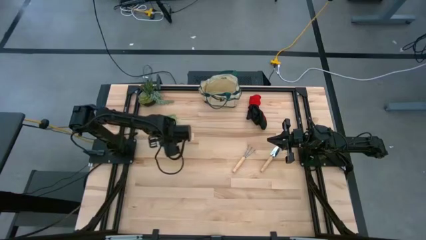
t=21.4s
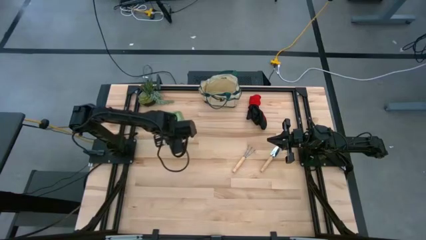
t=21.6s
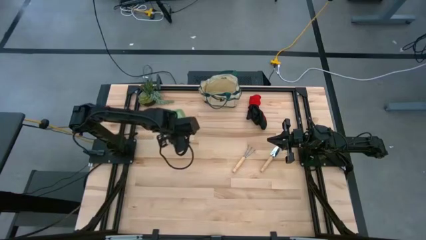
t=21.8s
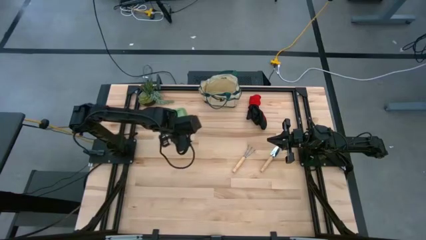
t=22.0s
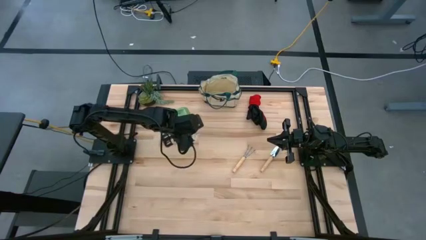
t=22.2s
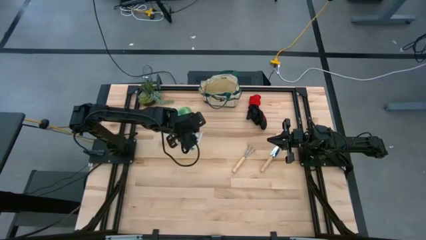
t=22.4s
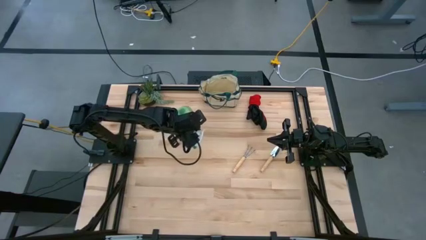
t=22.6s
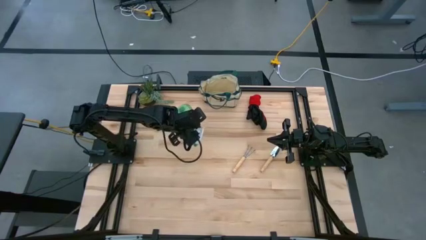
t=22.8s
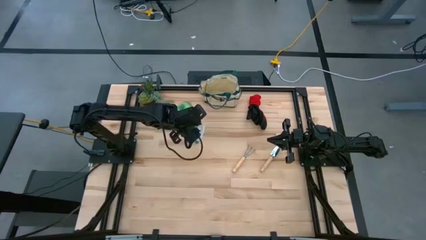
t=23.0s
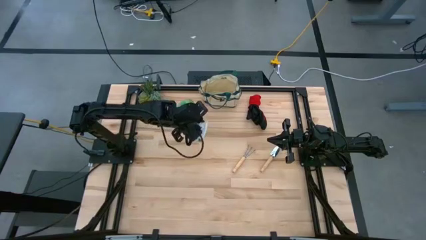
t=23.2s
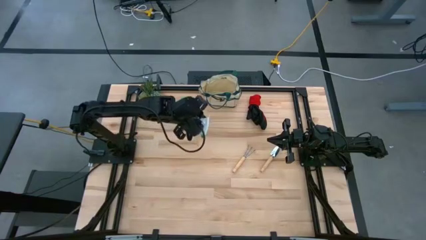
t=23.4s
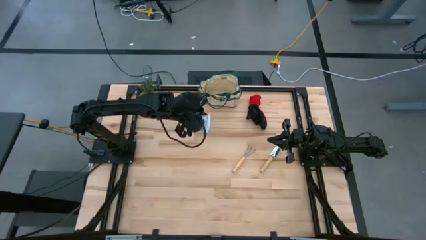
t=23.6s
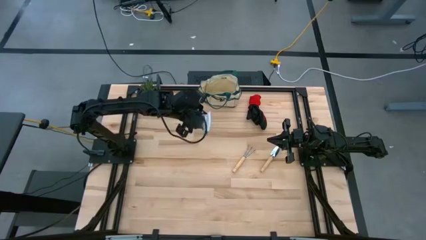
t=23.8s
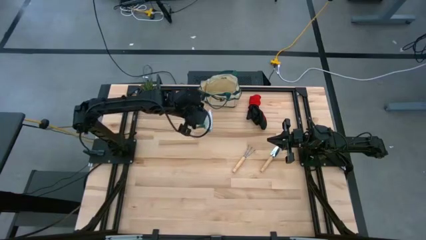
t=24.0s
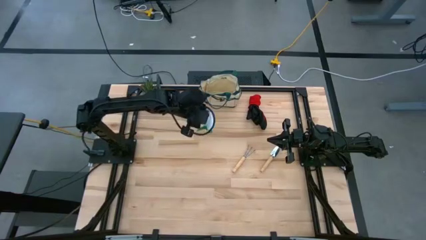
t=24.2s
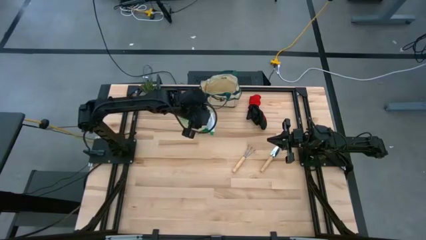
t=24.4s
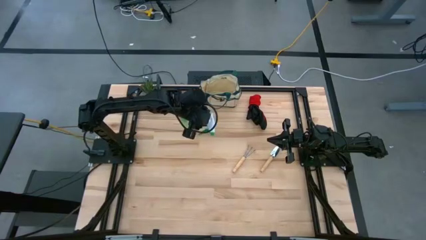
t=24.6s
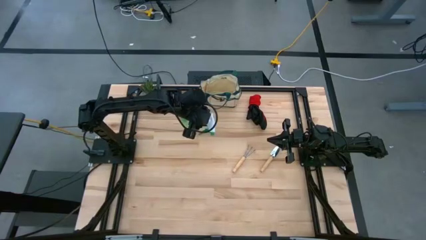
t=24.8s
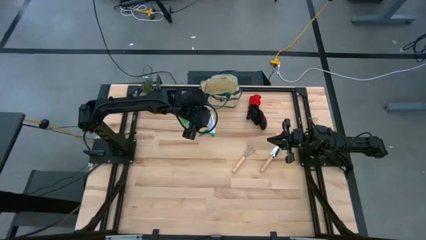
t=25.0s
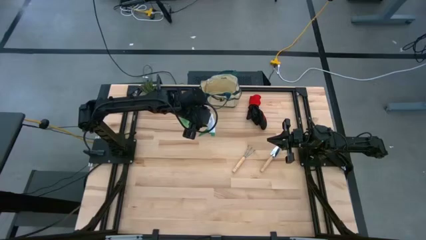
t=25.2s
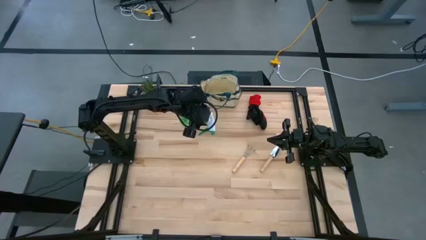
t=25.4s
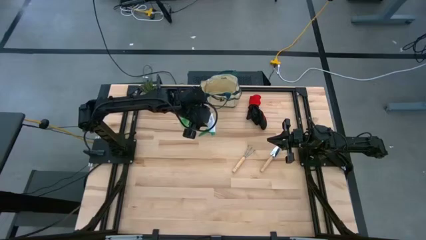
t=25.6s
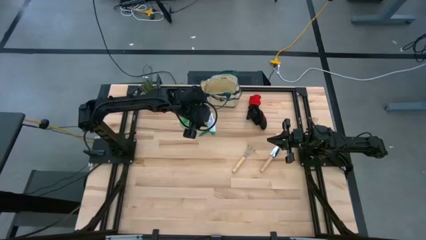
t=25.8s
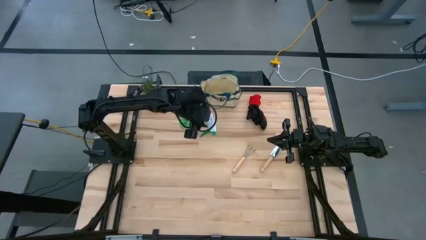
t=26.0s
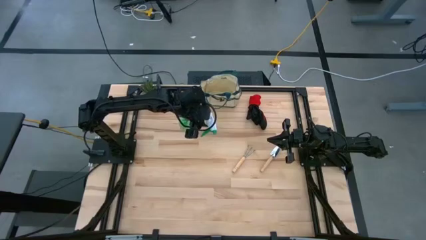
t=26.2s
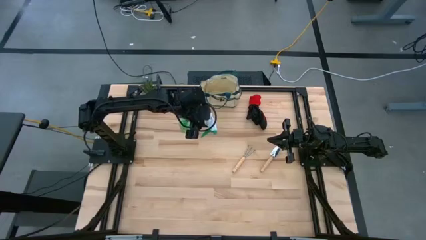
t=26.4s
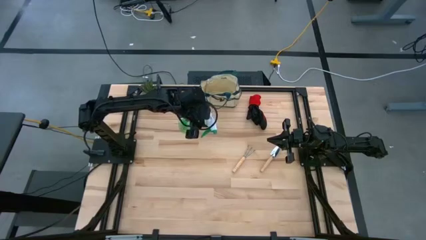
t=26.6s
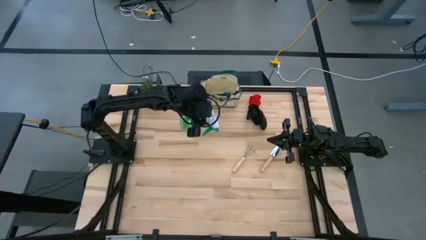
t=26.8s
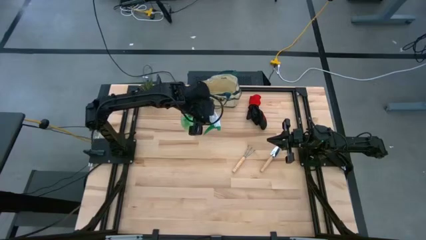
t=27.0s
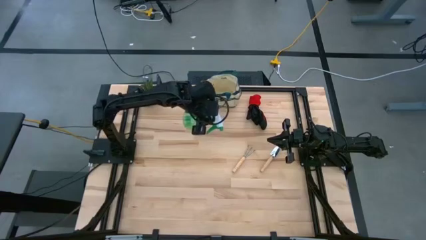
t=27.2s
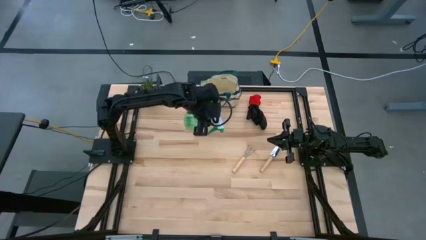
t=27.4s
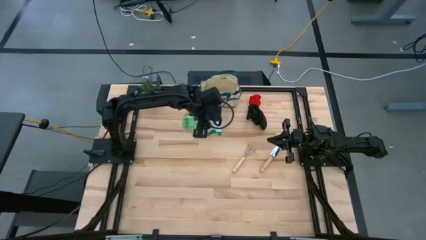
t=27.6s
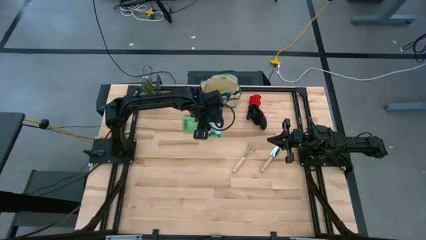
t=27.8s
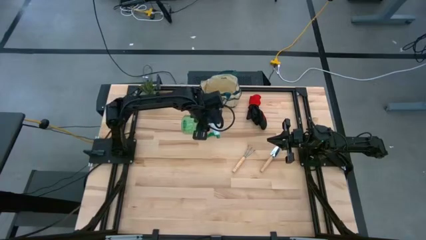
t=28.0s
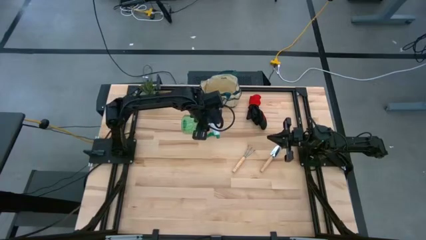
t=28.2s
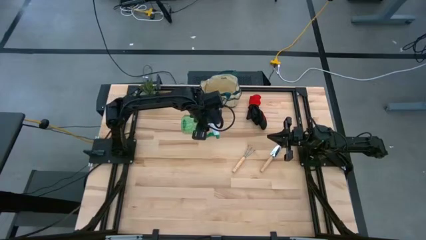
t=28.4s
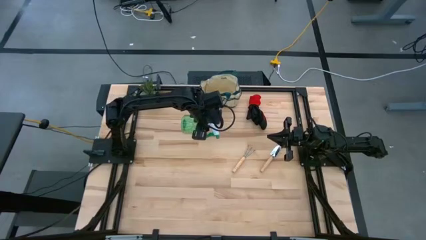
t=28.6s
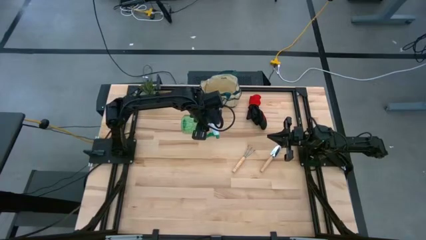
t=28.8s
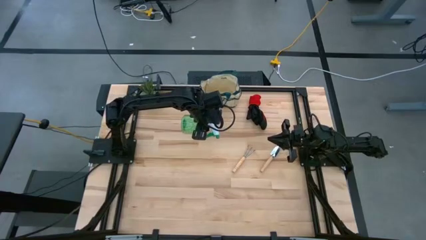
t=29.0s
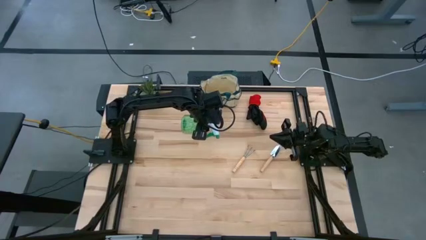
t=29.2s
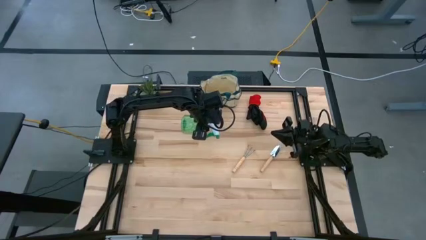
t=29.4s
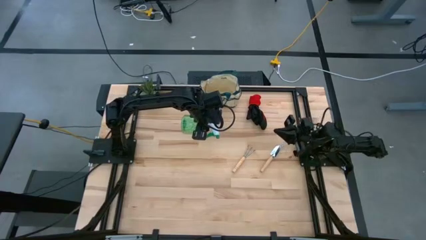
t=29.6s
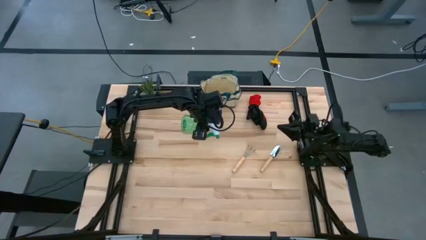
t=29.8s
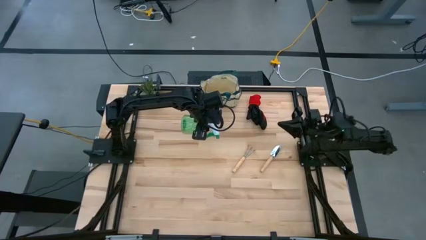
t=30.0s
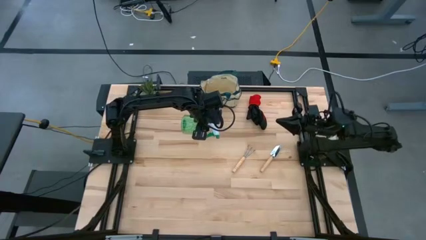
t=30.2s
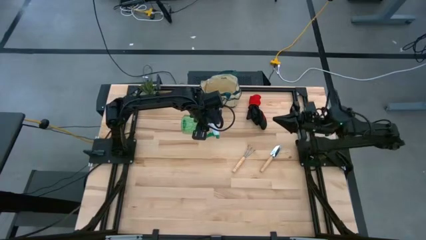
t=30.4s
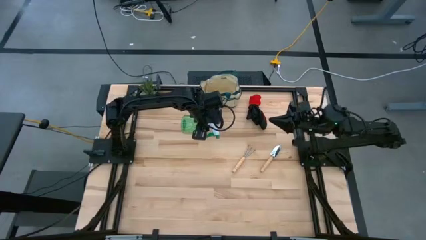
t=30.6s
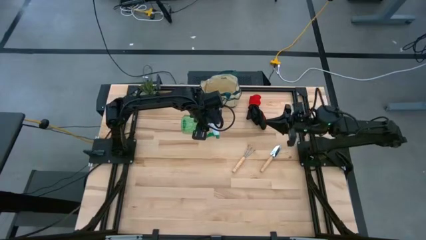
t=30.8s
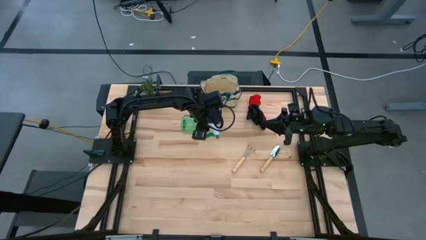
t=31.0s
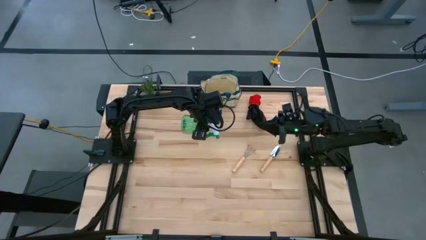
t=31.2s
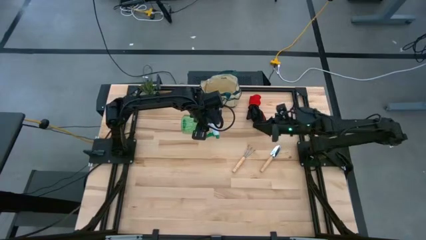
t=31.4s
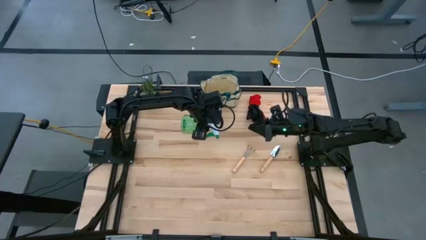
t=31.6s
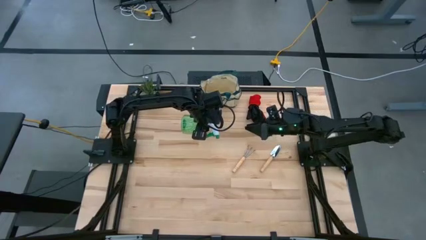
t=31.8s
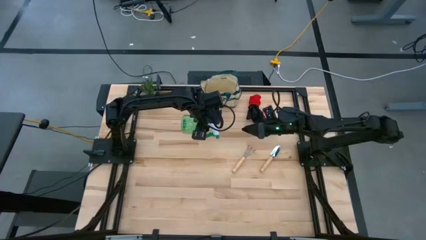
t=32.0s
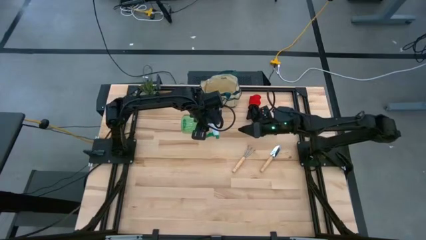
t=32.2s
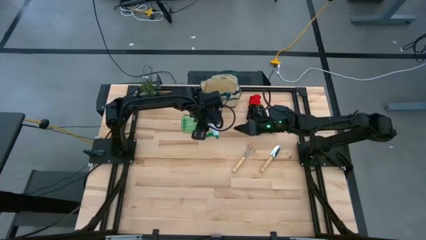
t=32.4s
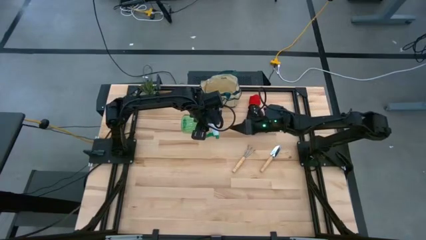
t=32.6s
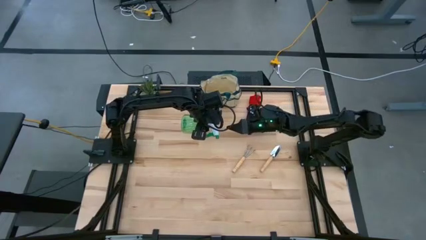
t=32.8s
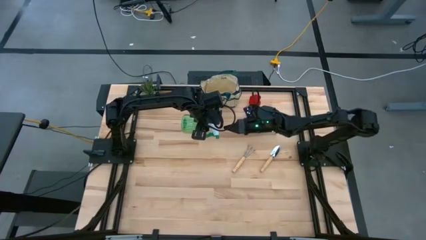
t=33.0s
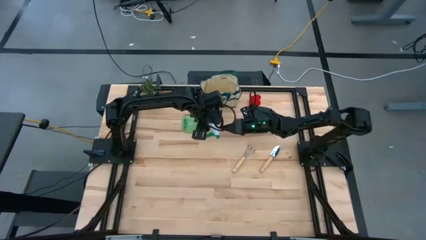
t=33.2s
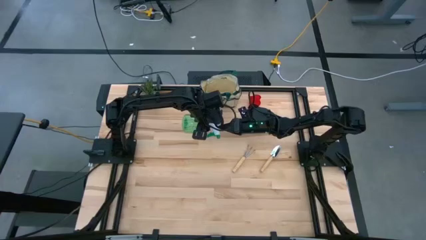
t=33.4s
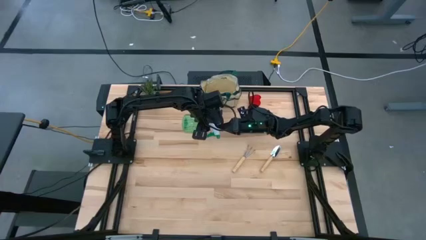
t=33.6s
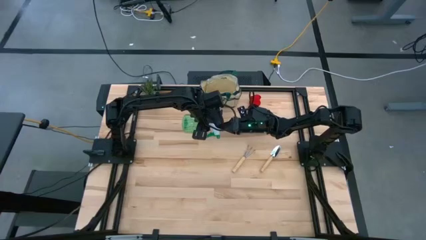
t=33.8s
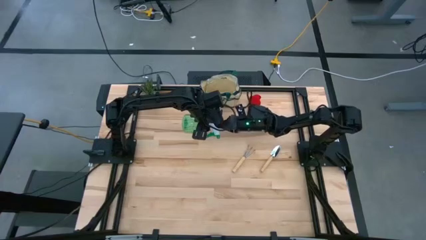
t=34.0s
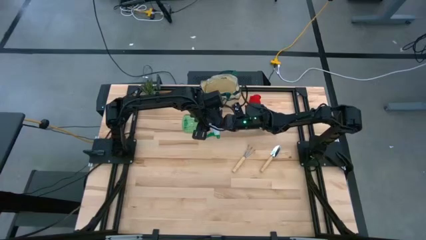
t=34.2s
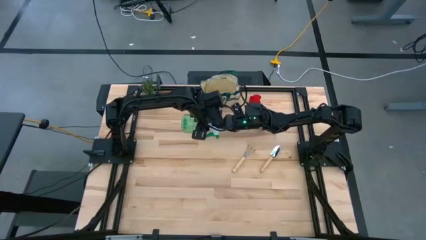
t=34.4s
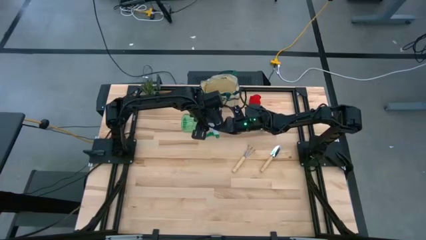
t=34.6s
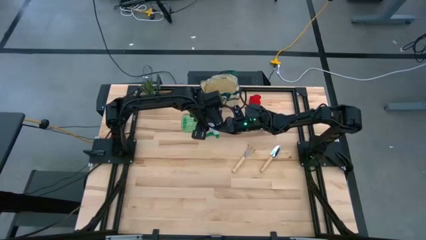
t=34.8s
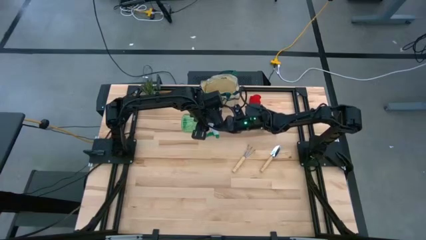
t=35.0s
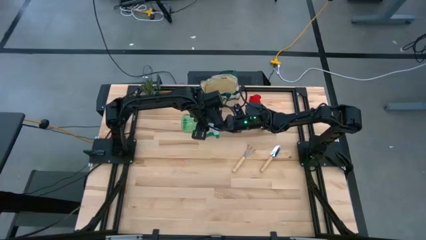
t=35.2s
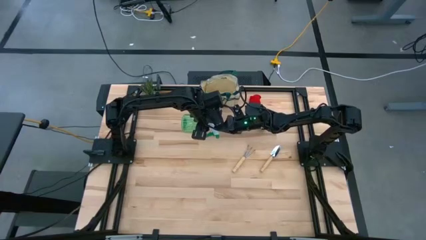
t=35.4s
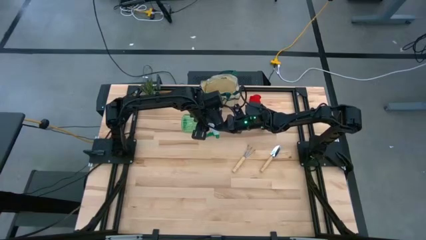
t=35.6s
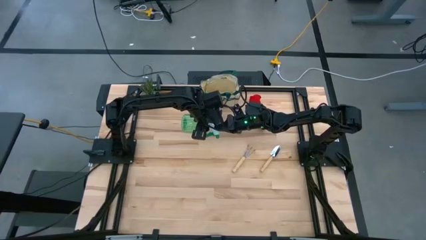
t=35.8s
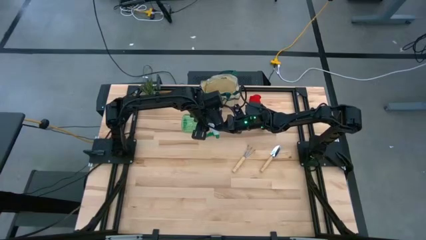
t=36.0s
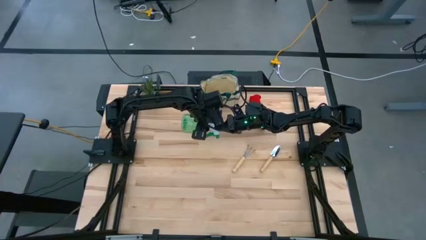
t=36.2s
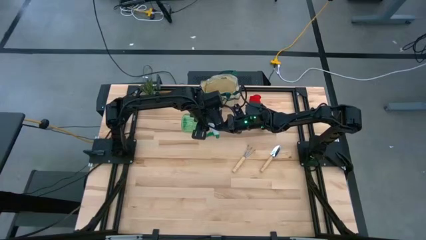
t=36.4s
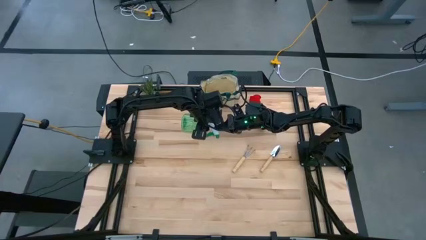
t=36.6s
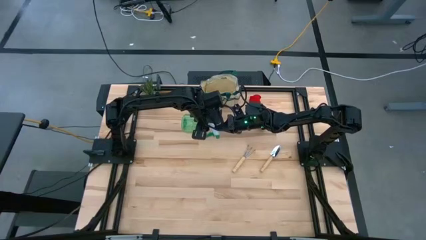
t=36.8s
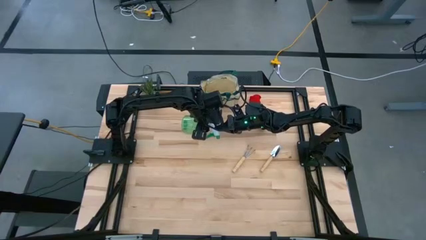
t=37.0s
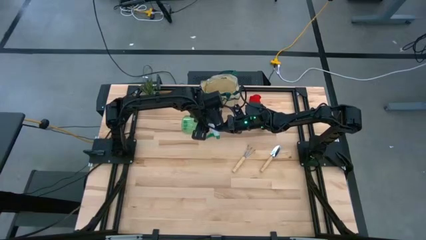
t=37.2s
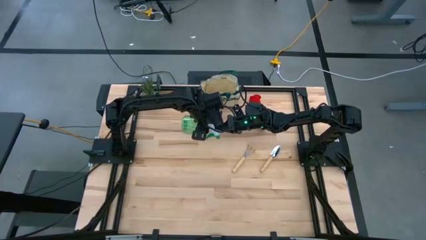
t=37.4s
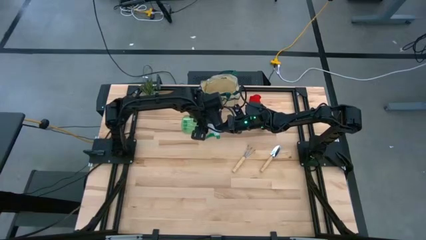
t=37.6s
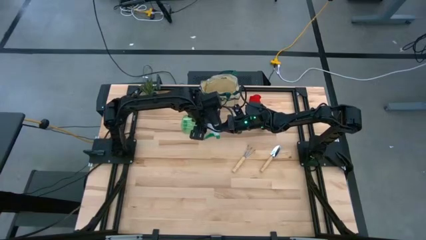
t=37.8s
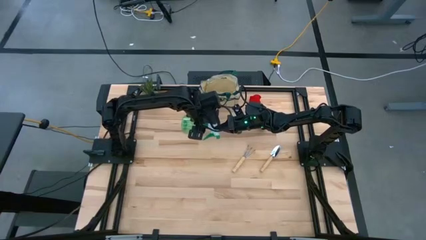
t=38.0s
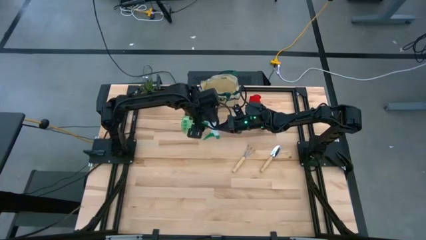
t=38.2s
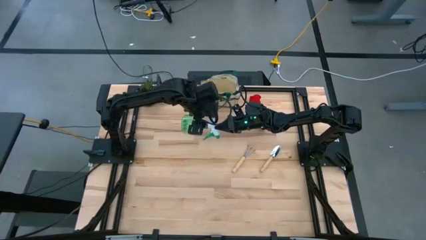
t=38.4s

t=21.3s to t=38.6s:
Task: Pick & Place Garden tools in Gardening bag
Put the green spray bottle into the white gardening bag
